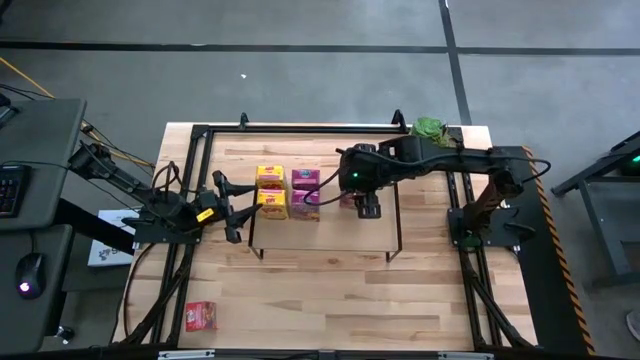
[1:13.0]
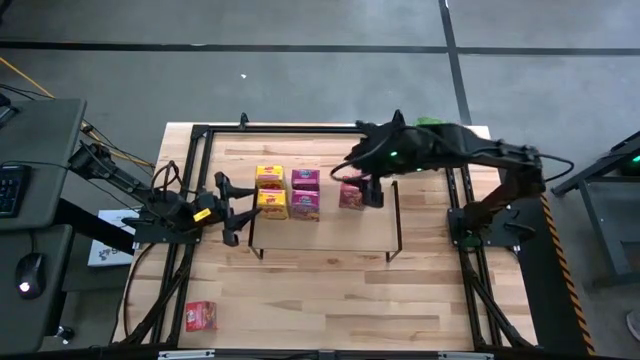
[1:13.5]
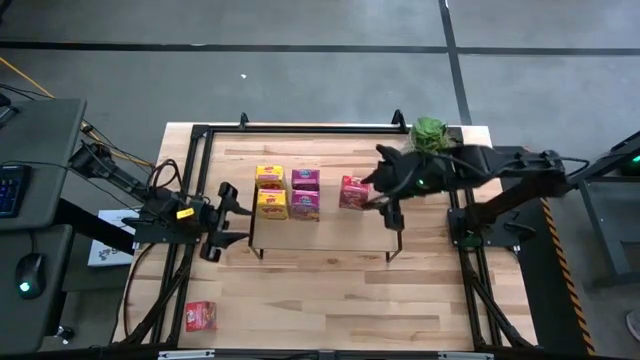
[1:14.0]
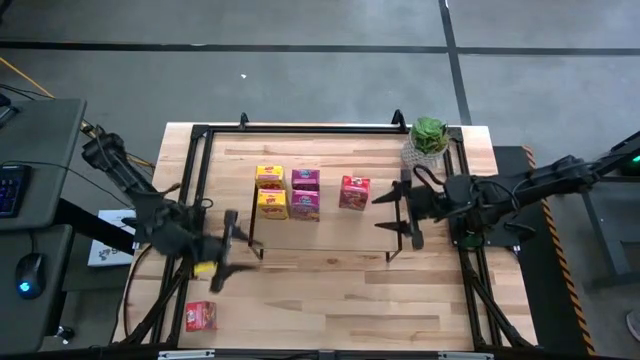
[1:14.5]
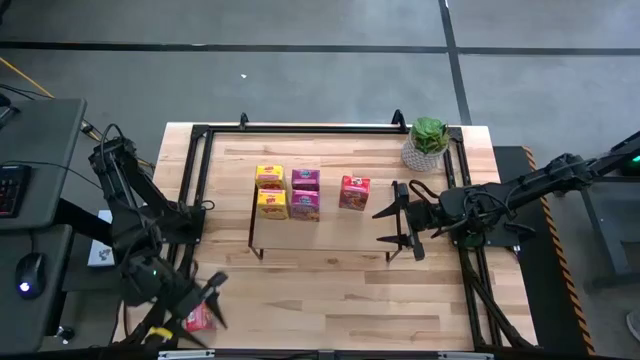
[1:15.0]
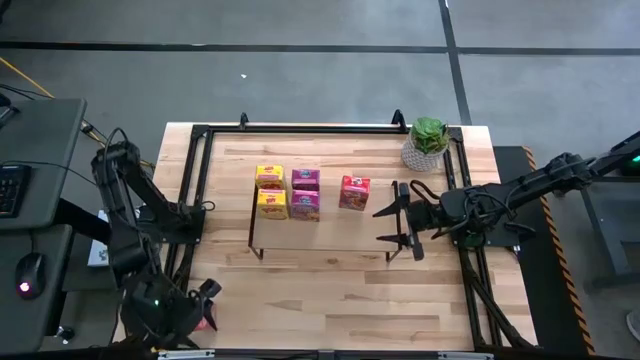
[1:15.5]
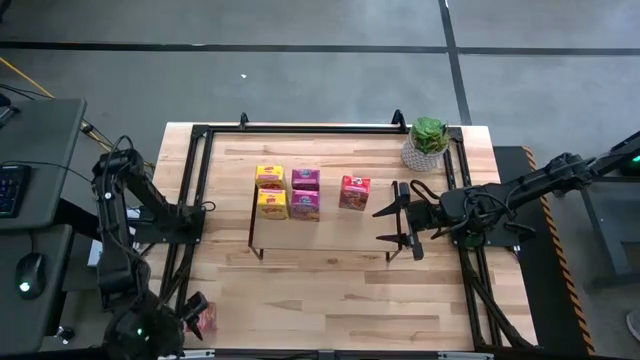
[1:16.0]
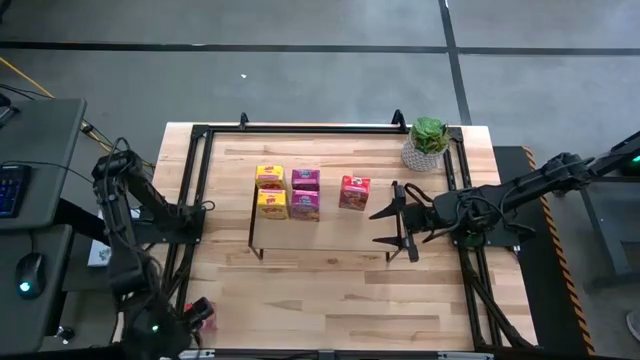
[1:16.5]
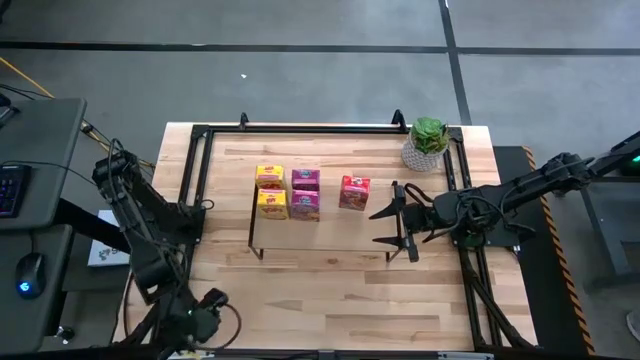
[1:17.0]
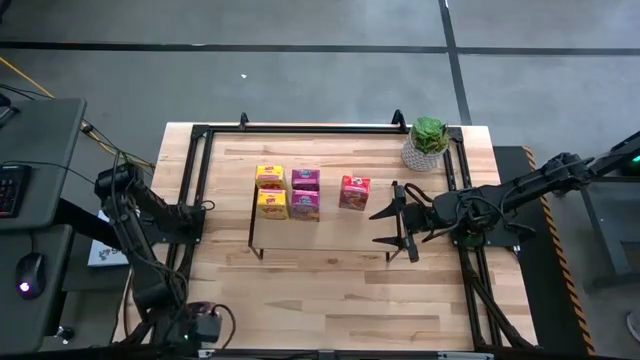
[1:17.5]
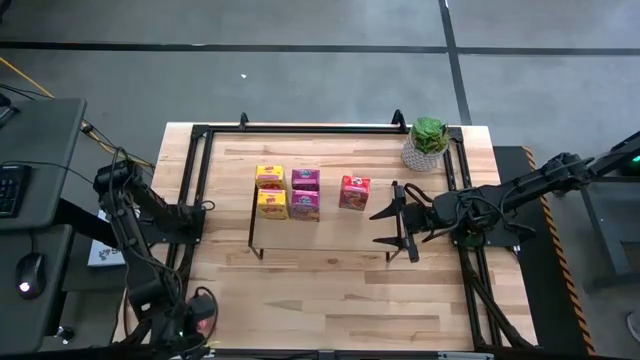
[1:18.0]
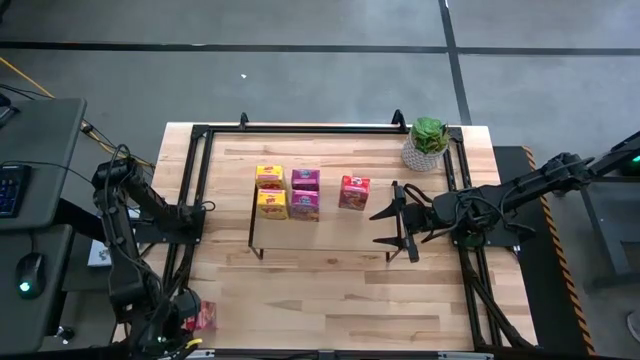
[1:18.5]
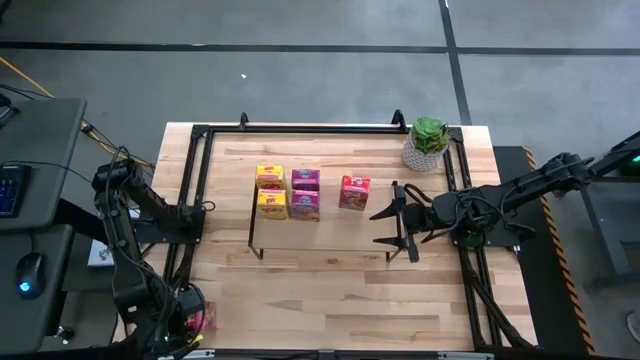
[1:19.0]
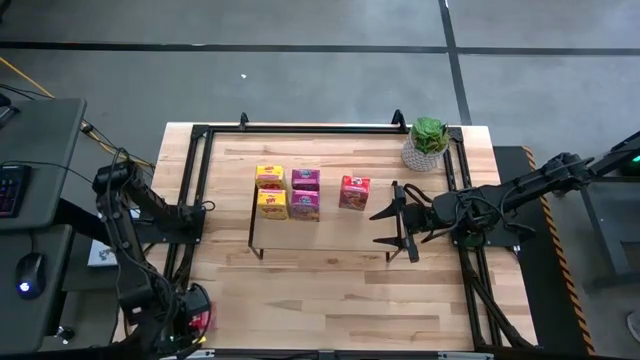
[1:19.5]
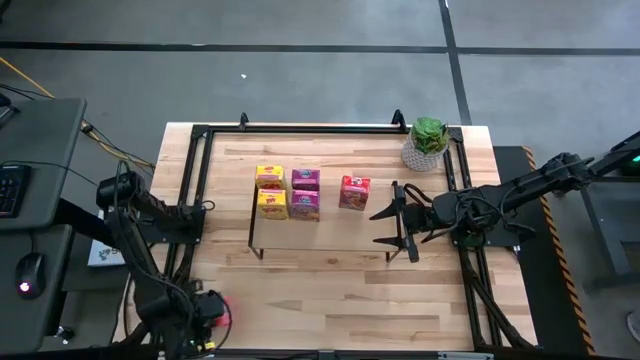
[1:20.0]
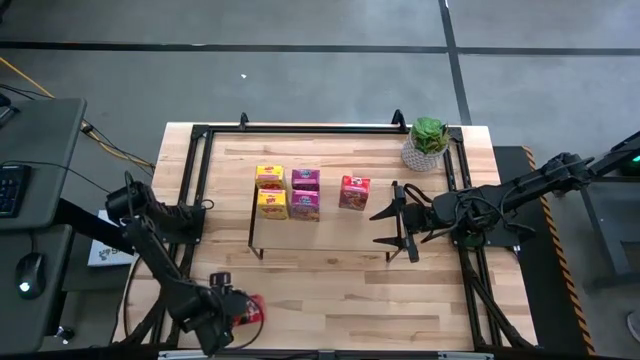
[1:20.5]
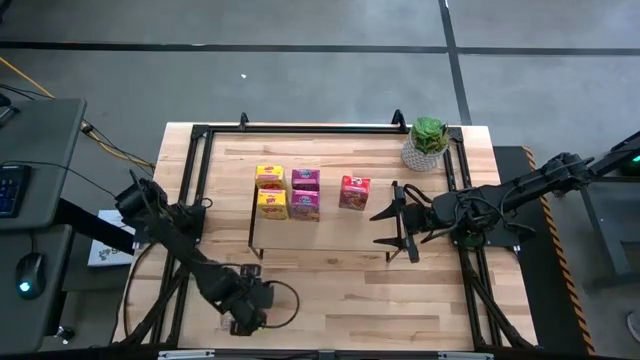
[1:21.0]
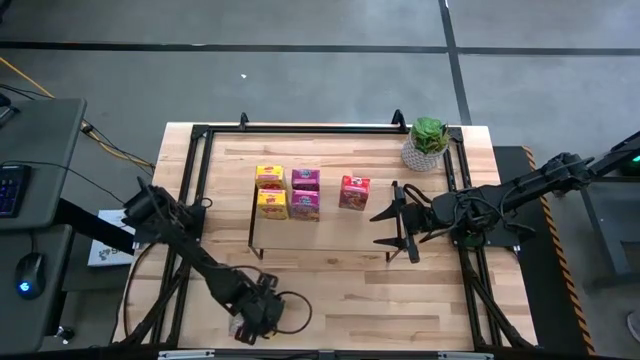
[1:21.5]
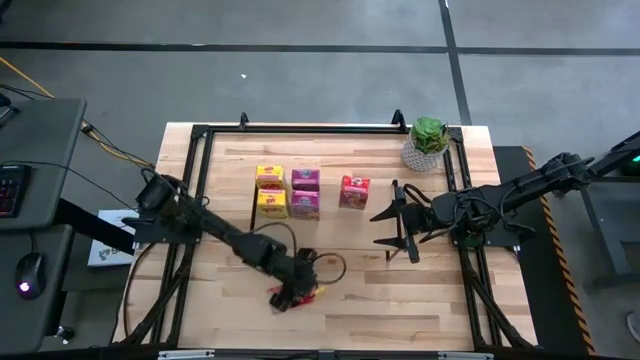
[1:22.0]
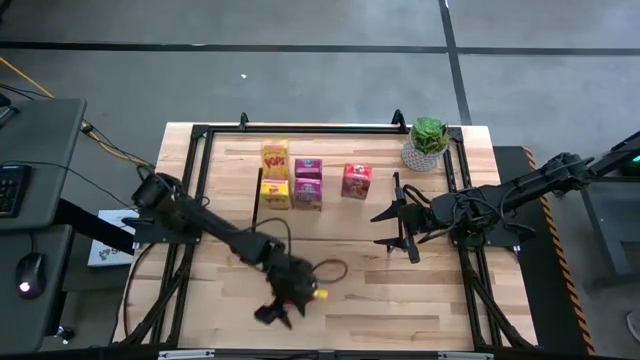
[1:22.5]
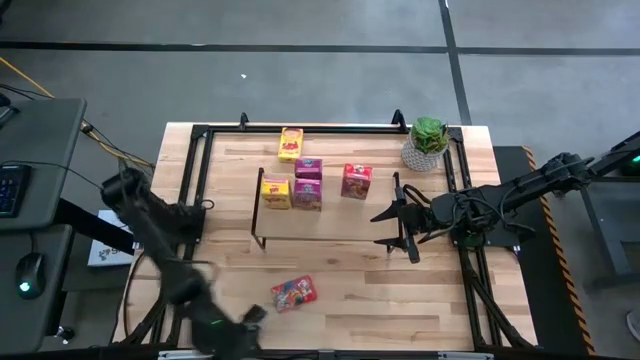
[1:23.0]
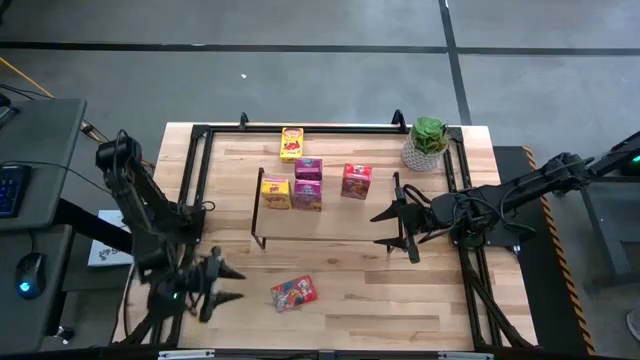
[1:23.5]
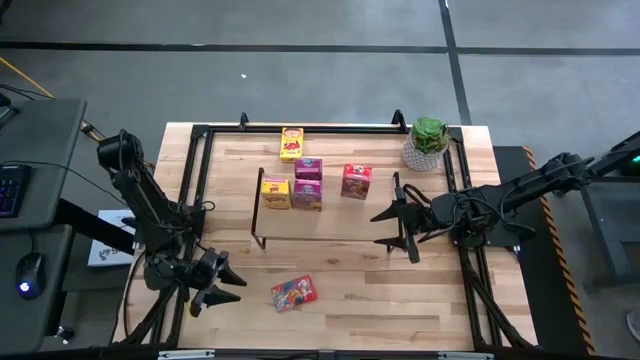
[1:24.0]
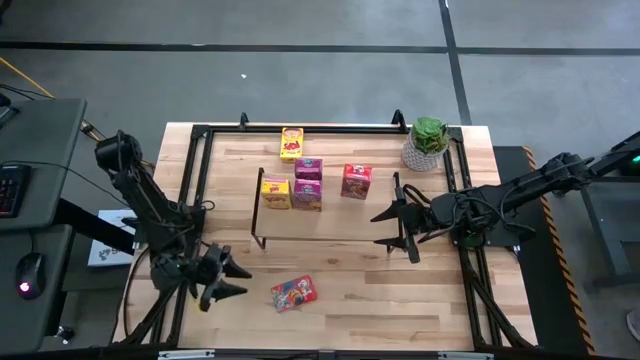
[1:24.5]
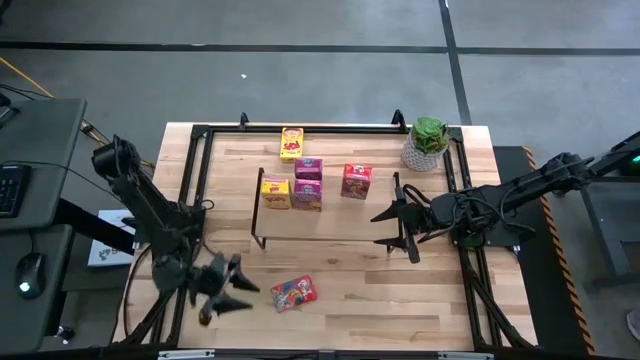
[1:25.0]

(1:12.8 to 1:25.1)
Task: Stack cereal on shelf
Put the red cereal box on the shelf

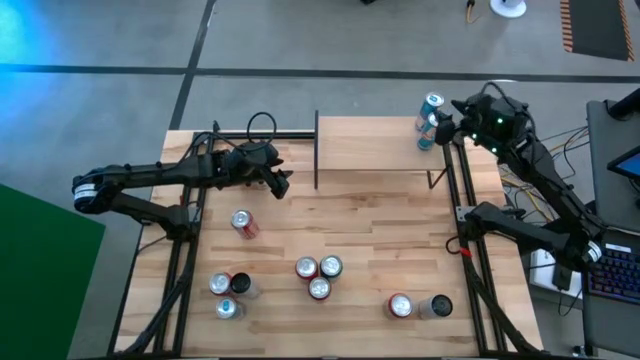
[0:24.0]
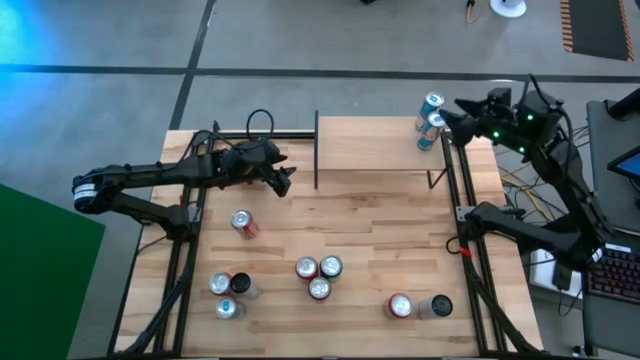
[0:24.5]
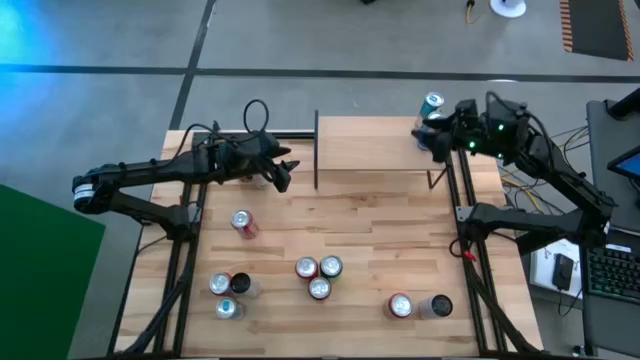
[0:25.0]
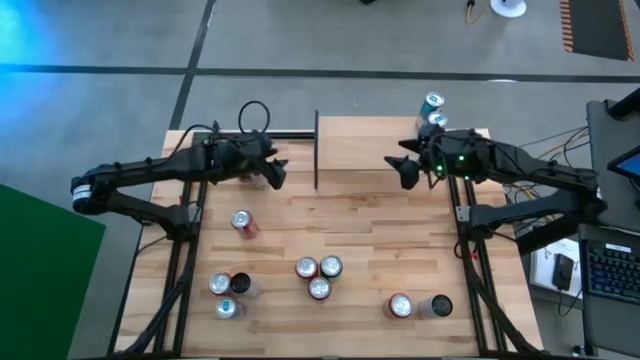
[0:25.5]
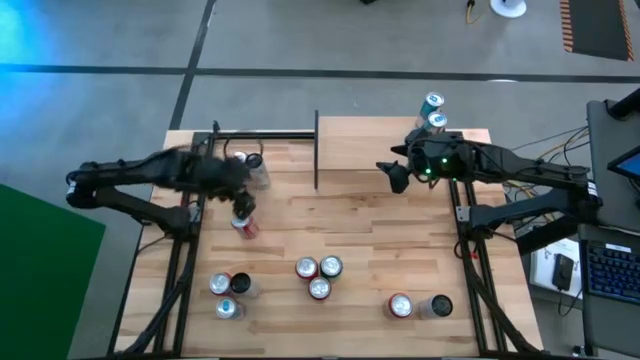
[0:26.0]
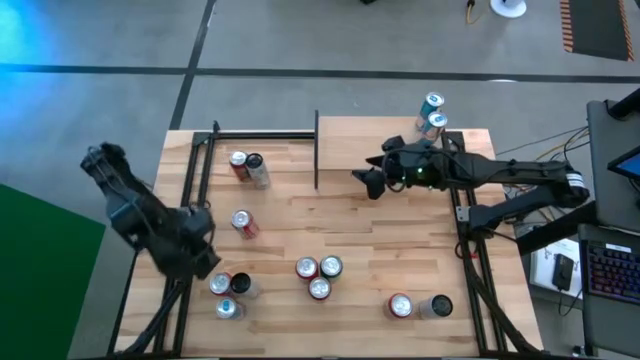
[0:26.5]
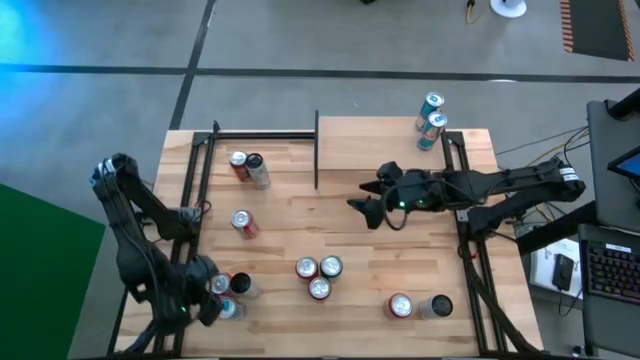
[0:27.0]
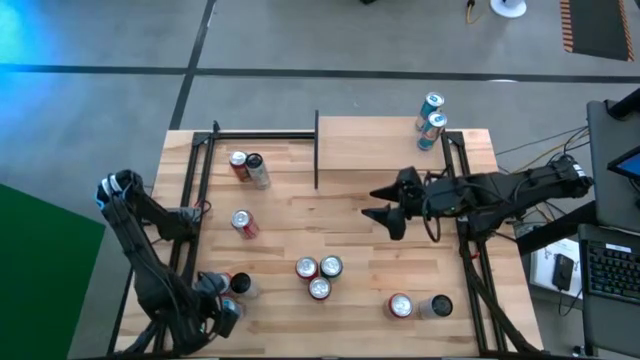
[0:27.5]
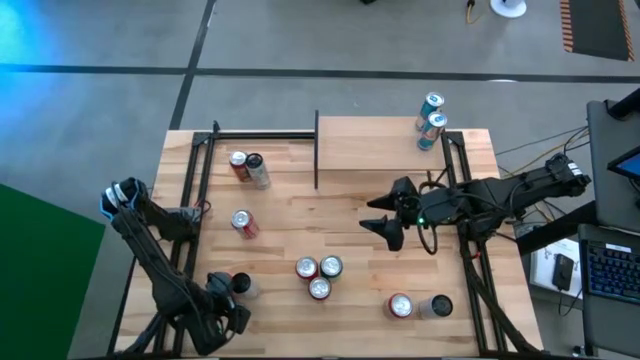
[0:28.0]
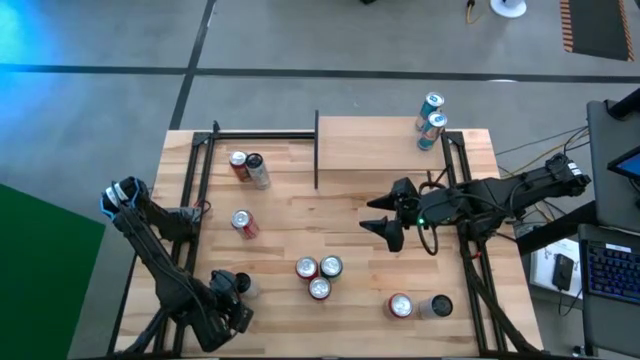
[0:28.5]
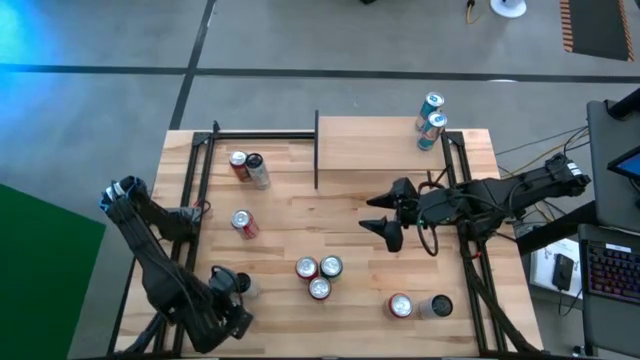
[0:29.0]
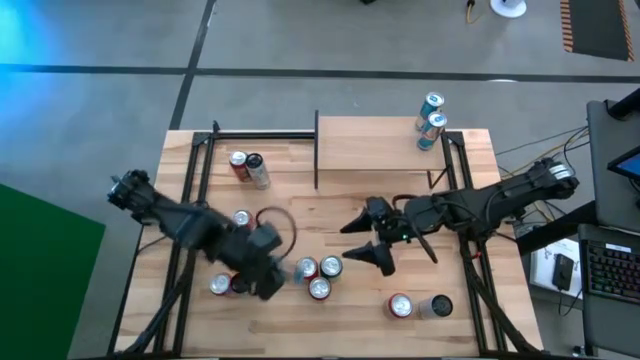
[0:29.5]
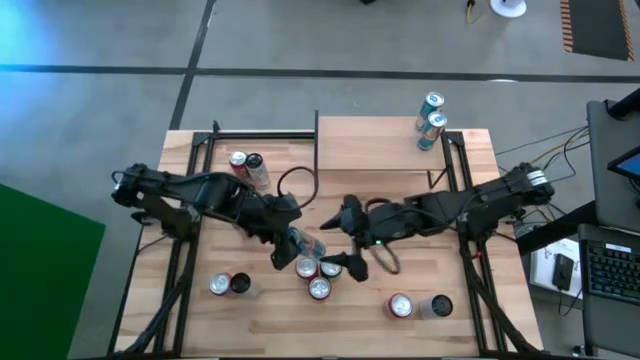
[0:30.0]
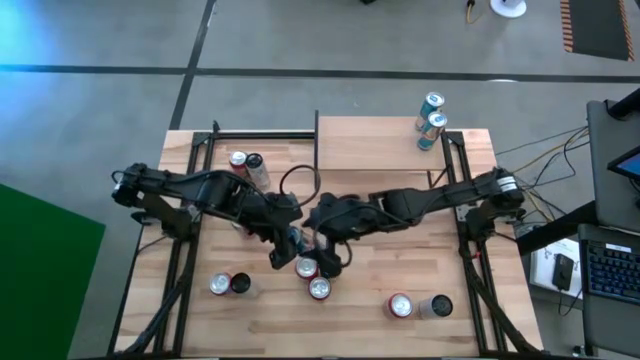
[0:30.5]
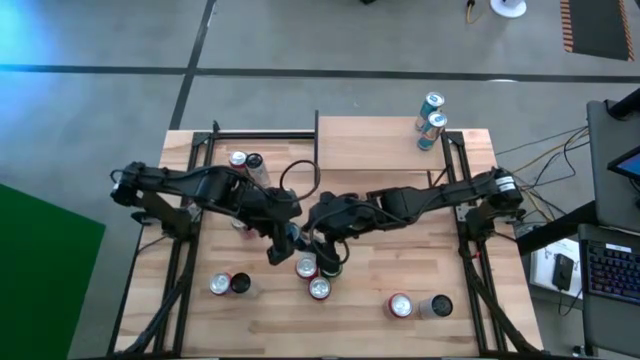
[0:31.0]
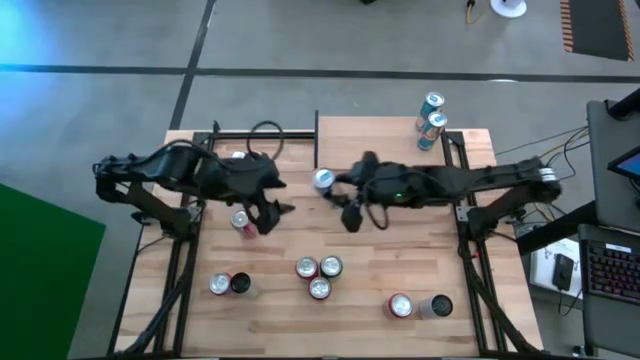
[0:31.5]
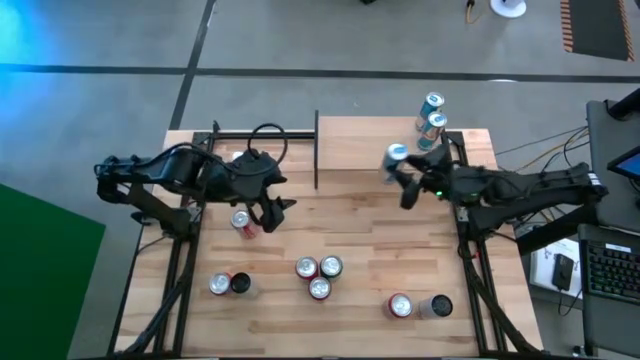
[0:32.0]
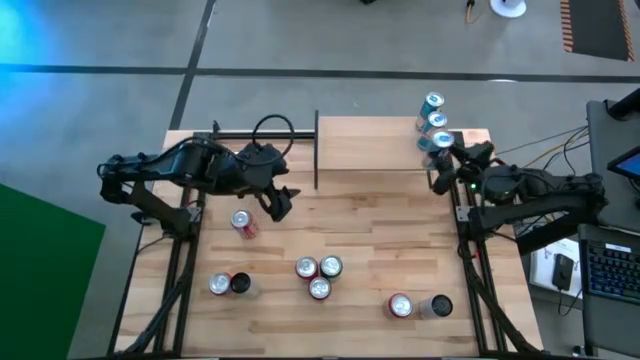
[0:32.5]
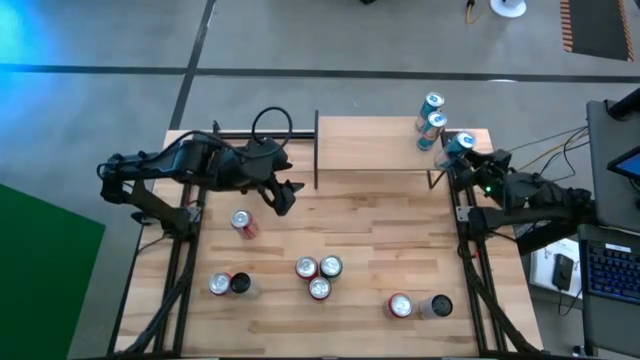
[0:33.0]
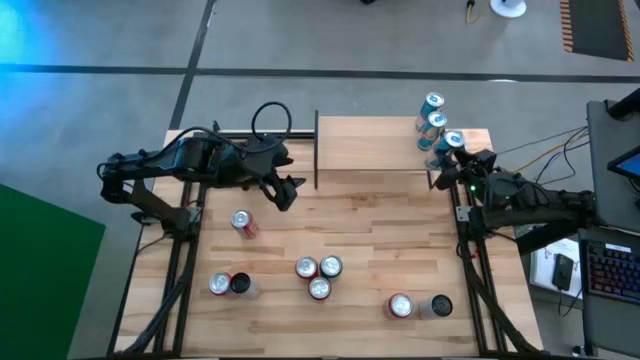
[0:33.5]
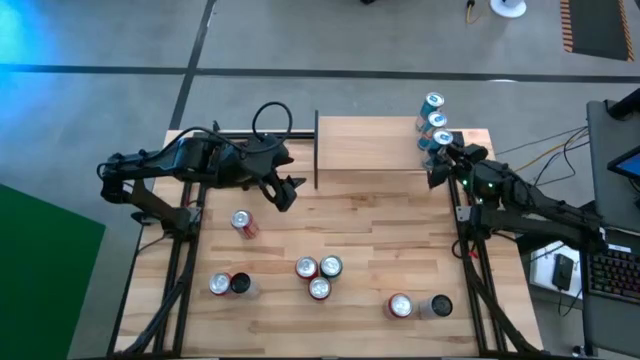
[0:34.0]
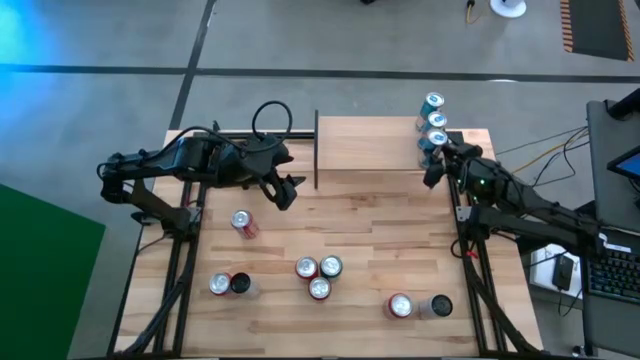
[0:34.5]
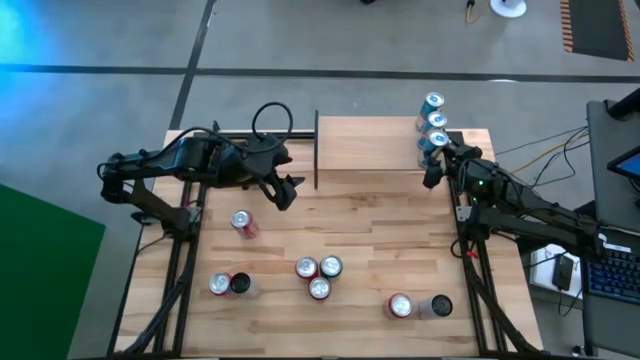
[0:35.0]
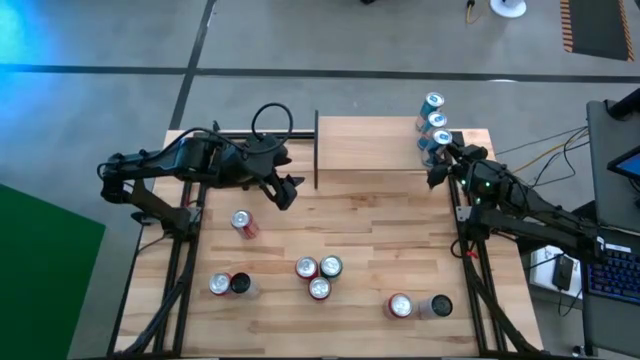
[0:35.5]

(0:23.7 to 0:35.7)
Task: Place canned beverage on shelf
Put the blue soda can on the shelf aligned with the other blue soda cans
